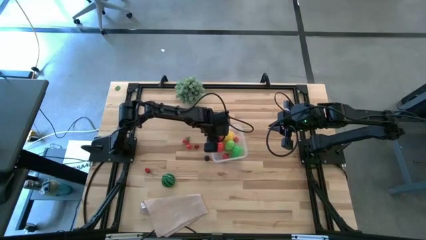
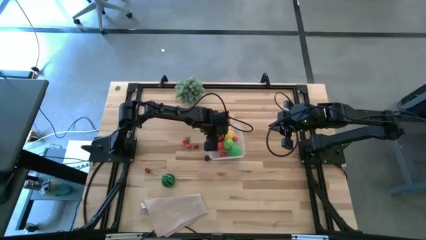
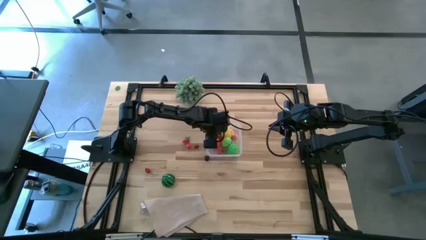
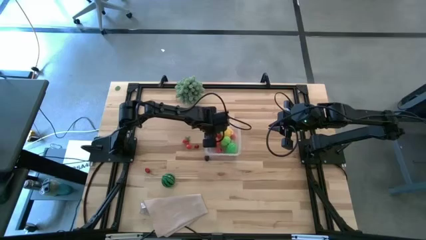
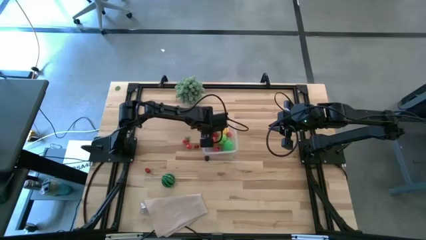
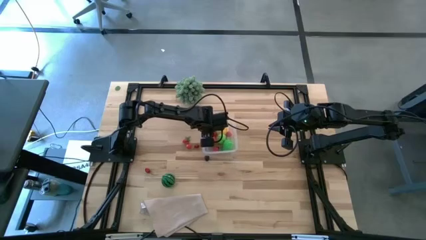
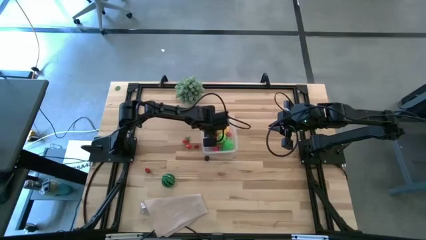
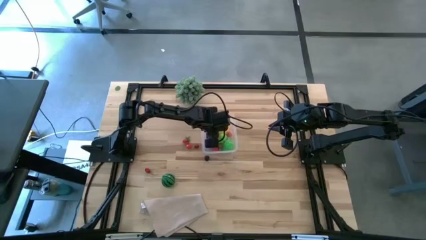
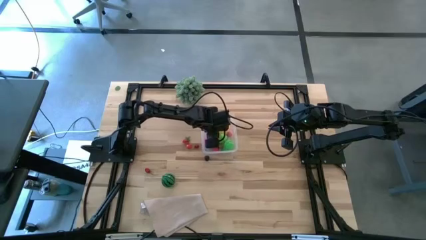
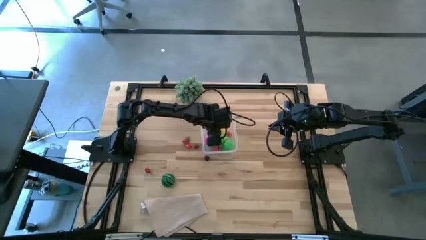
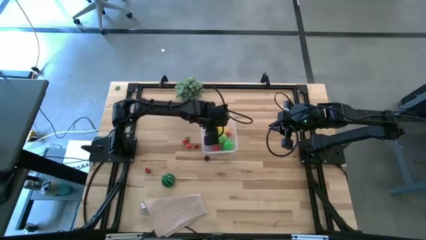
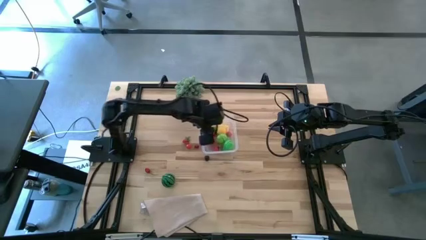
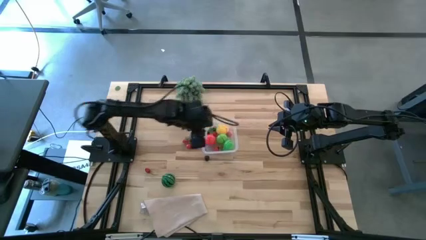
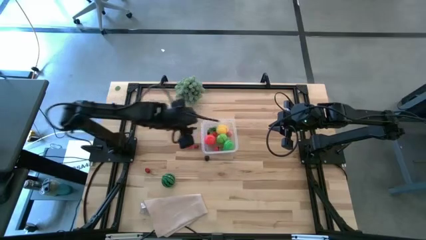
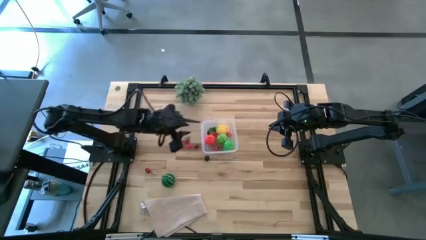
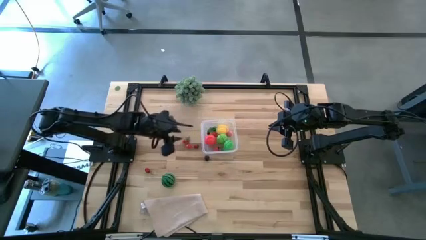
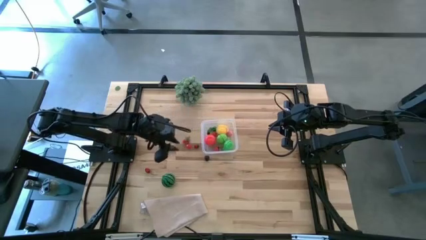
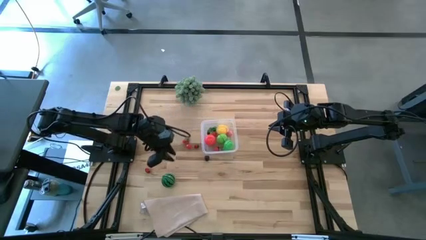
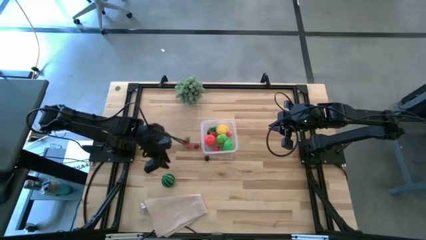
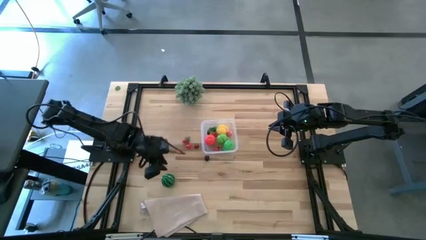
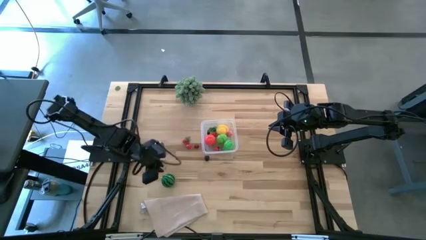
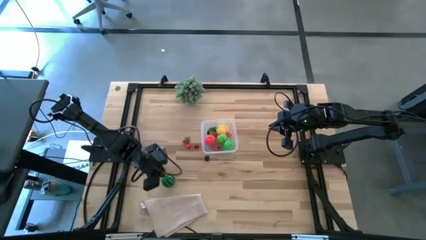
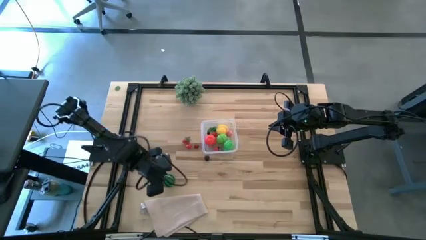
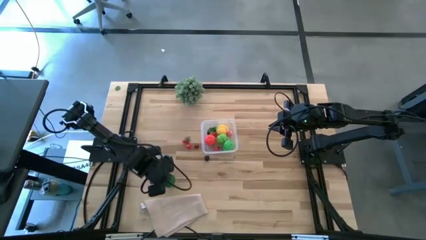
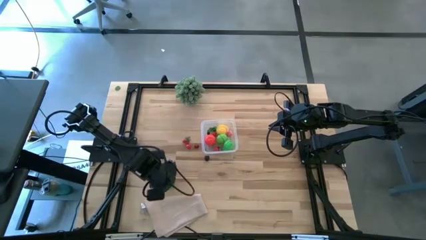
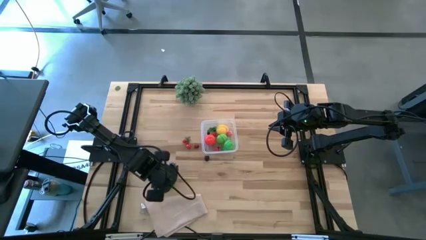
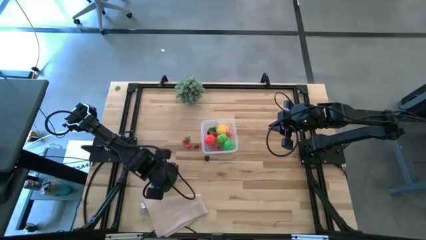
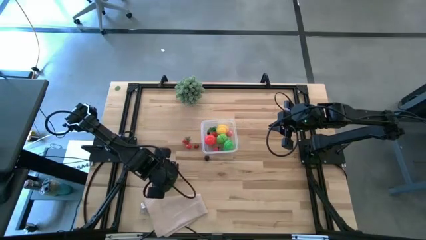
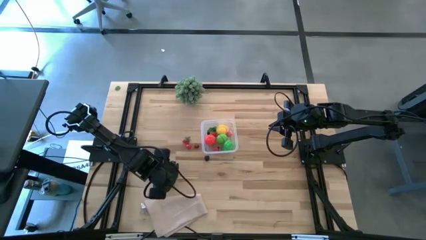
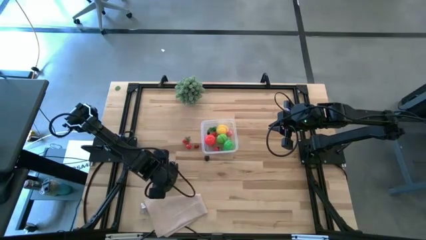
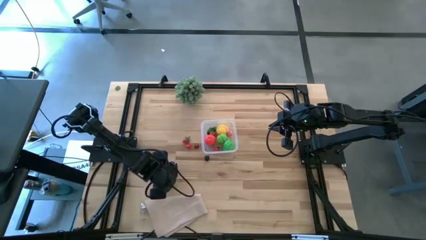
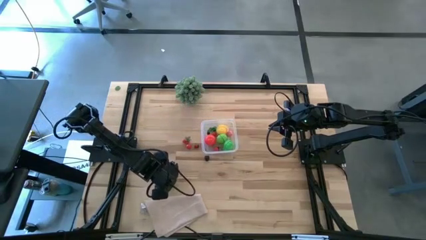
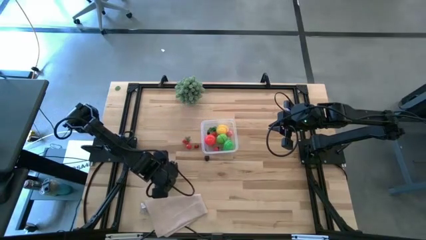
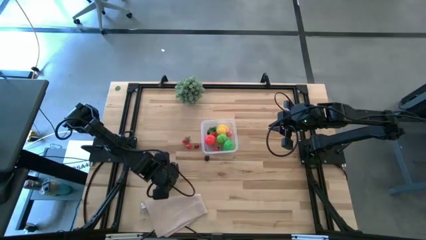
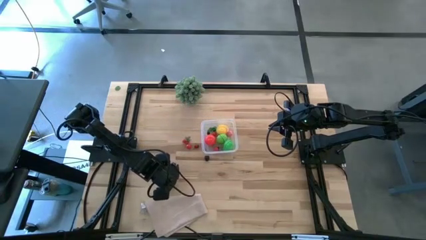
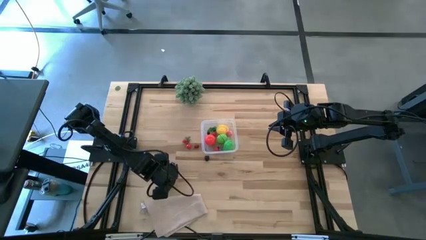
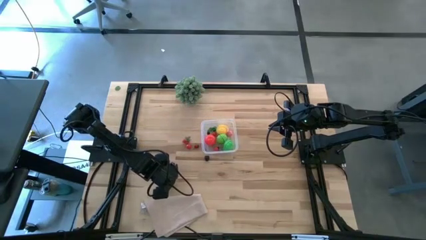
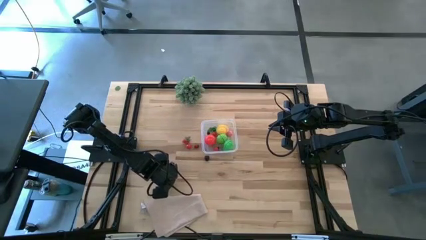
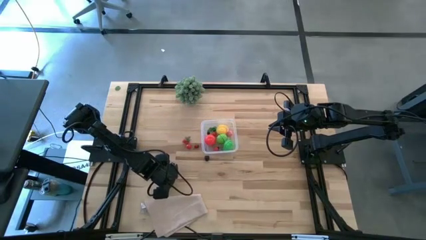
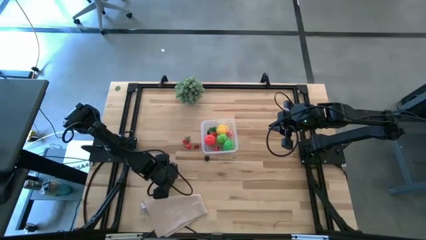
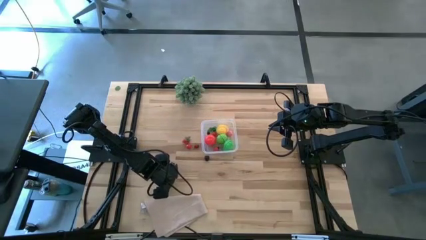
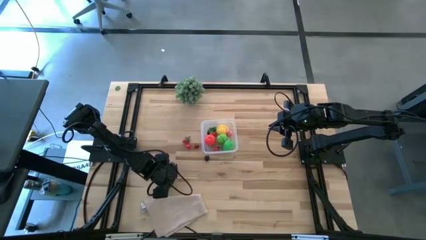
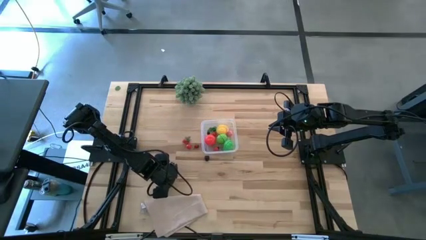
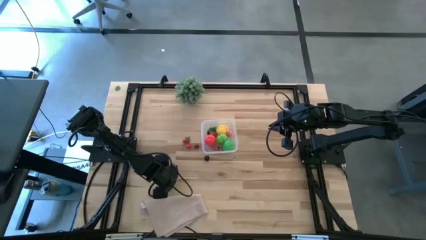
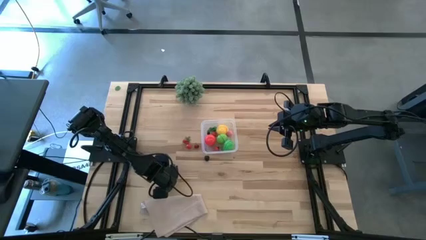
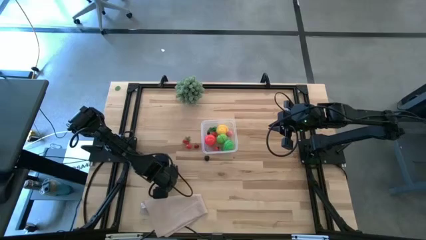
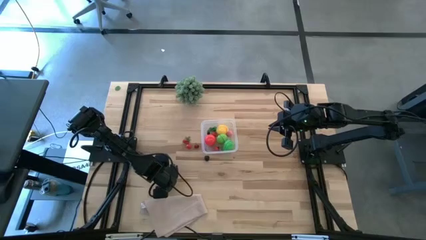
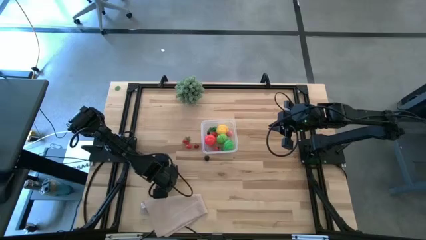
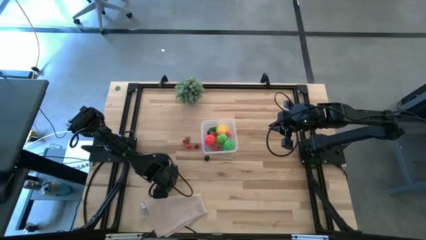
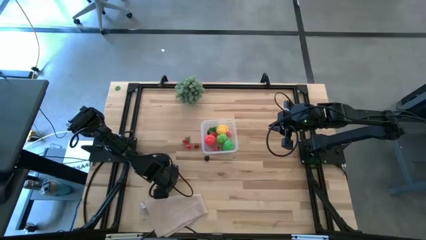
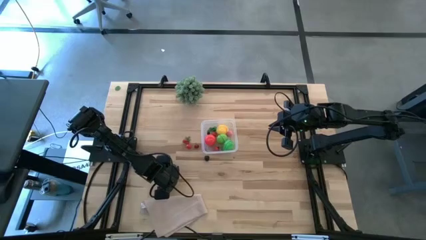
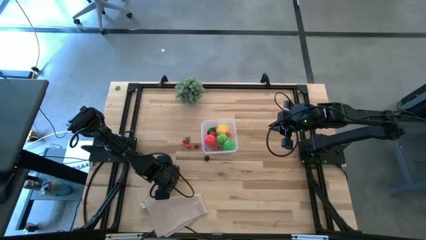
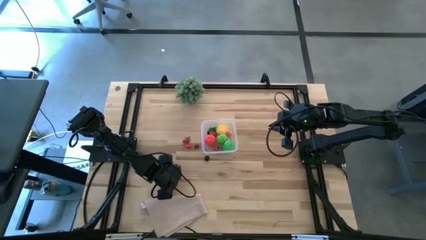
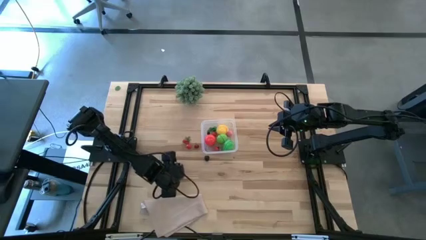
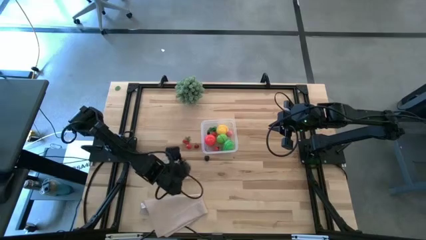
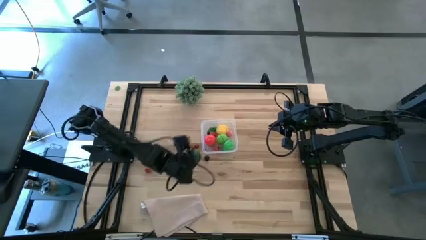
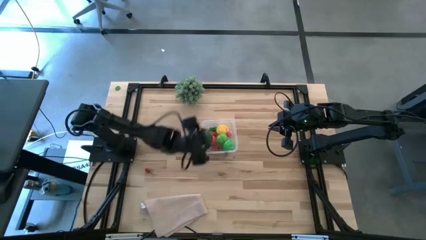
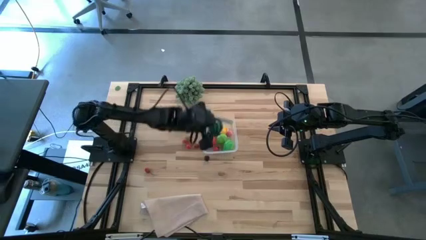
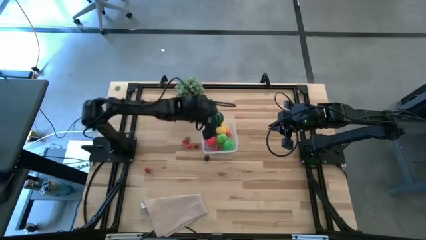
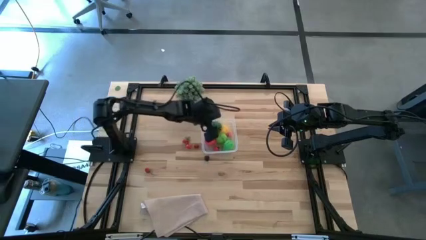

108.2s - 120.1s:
Task: Pick and placing Produce into tupperware
Put the watermelon into the transparent bin

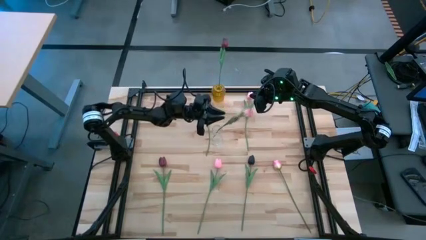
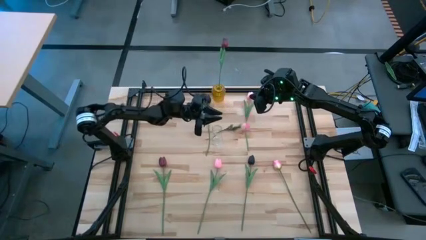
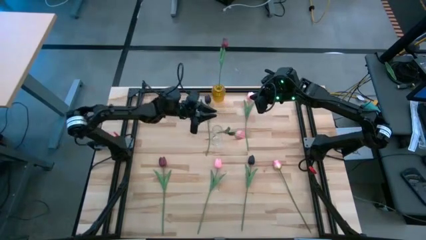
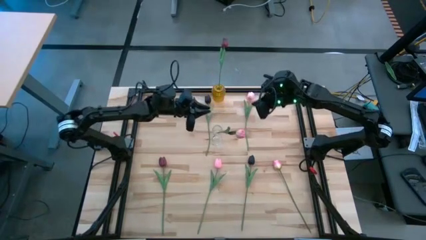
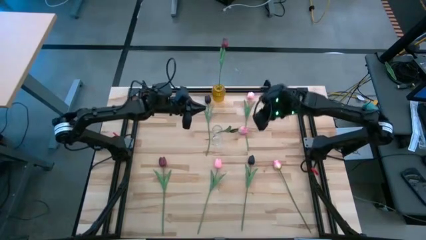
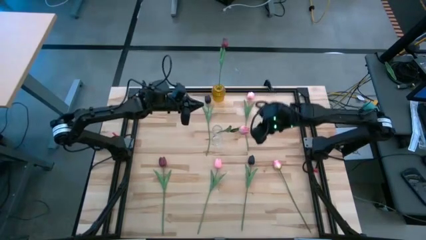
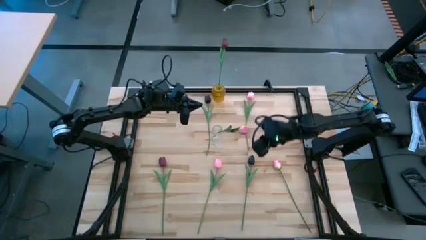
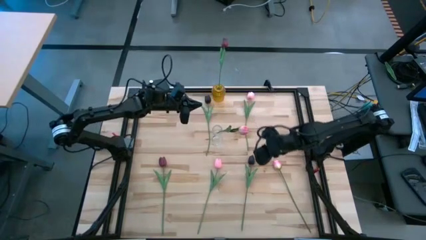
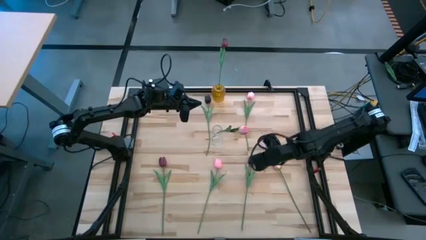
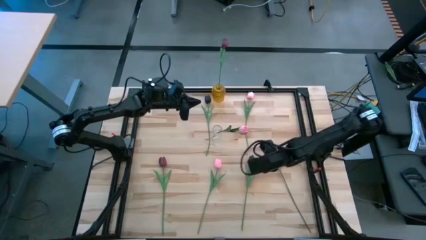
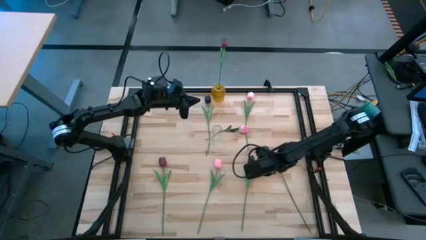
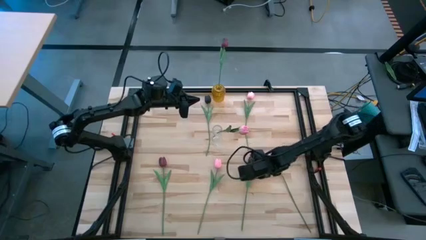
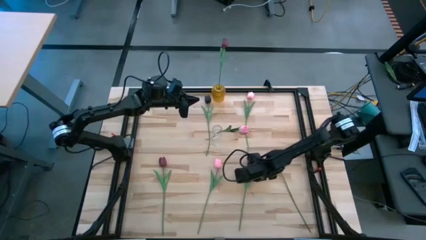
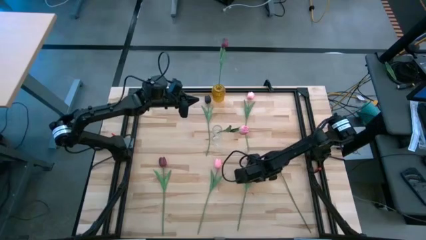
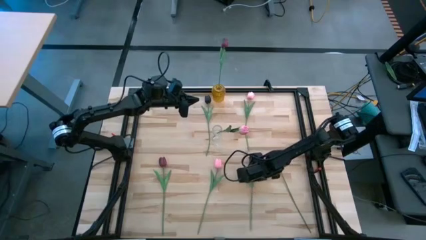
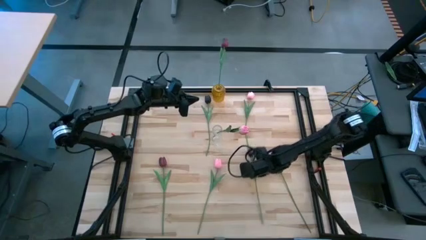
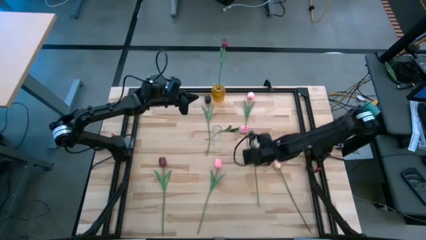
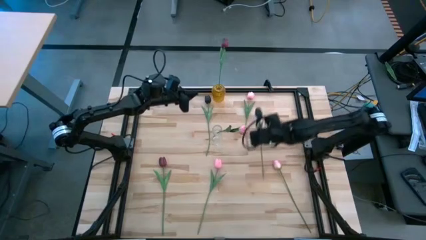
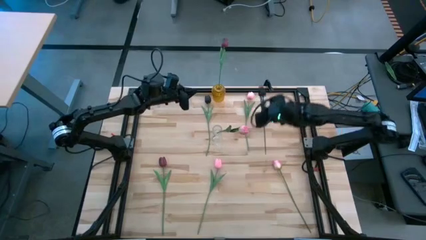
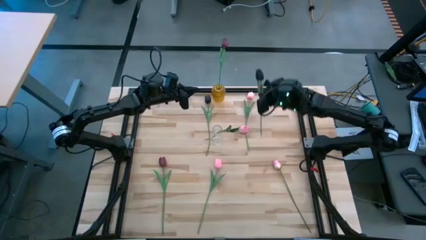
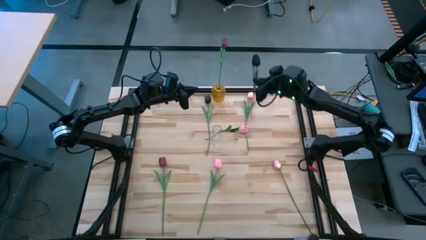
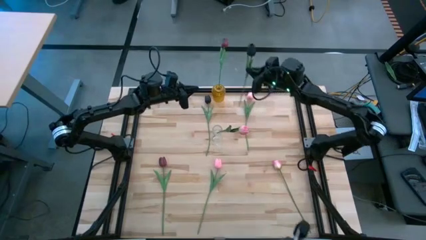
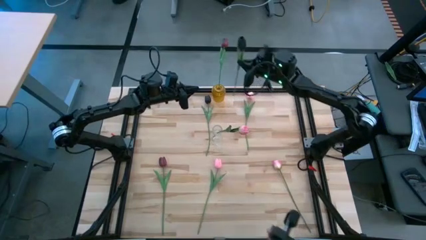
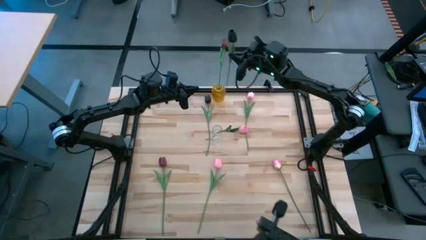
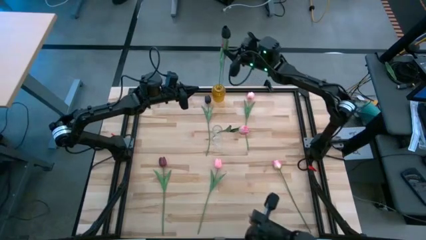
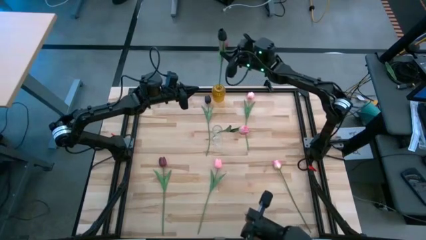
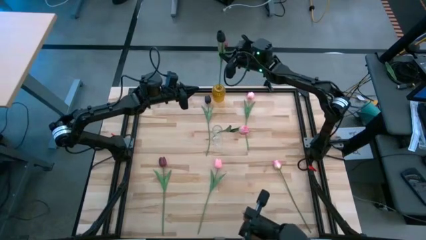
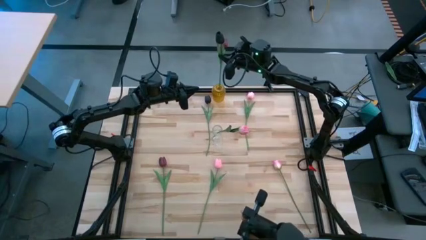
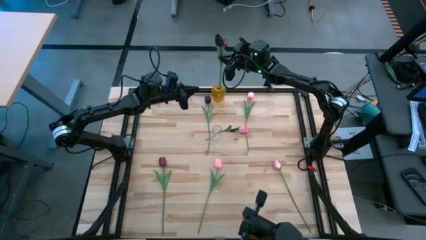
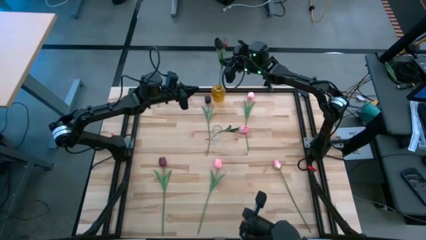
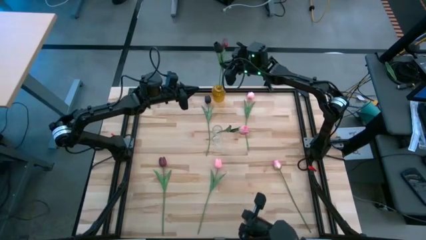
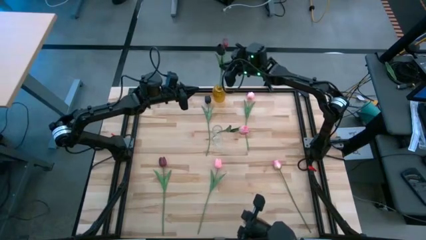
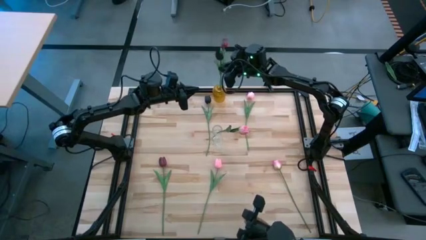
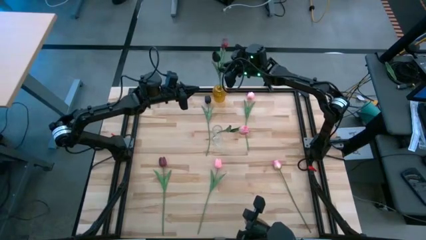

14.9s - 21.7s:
Task: Sort flowers into vase by color
Put the bottom black flower into the yellow transparent vase
